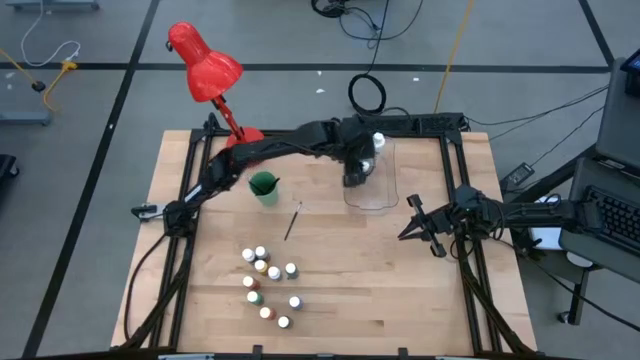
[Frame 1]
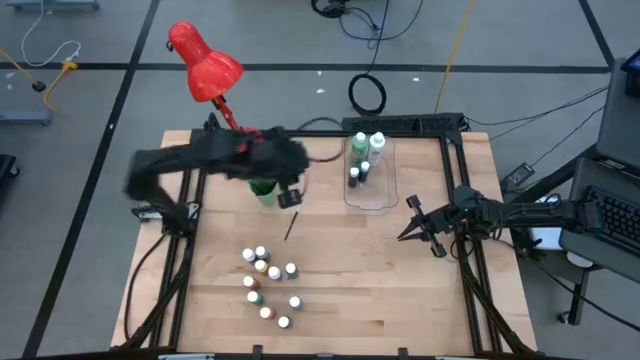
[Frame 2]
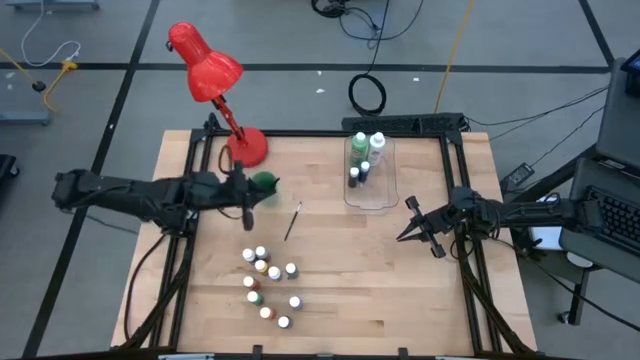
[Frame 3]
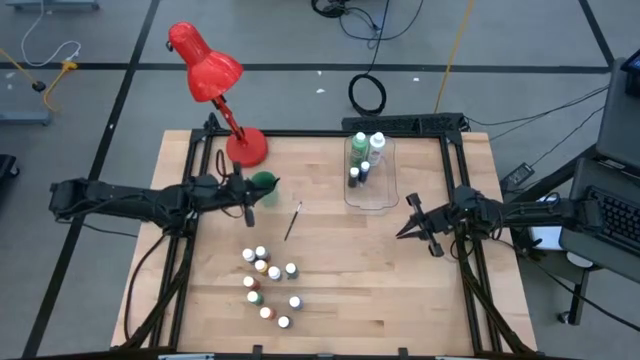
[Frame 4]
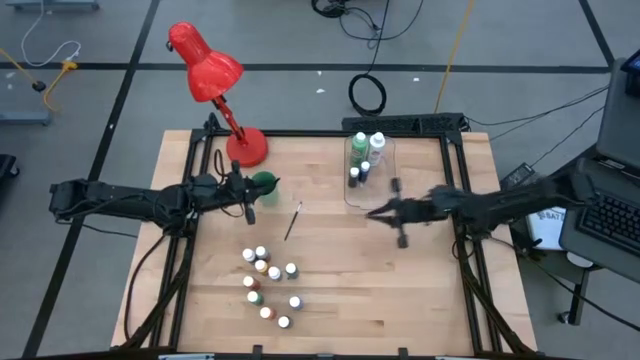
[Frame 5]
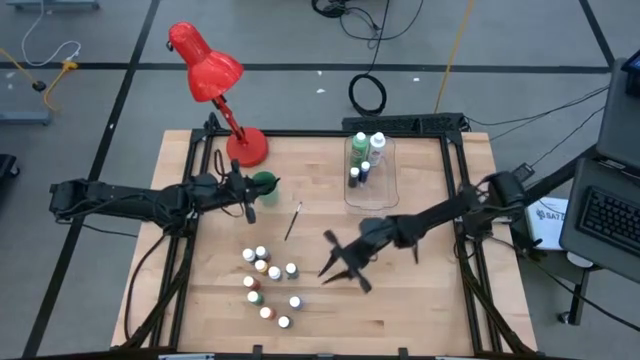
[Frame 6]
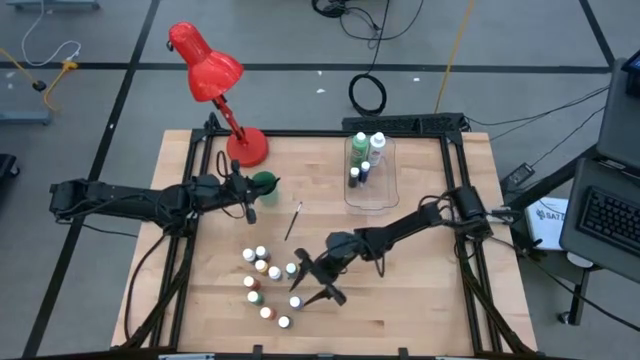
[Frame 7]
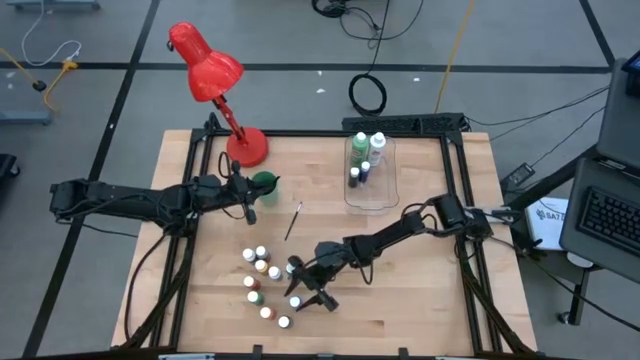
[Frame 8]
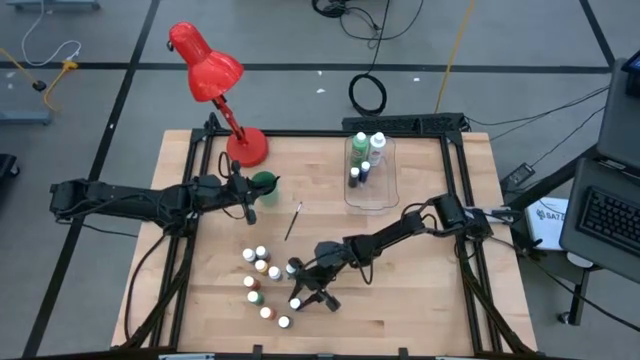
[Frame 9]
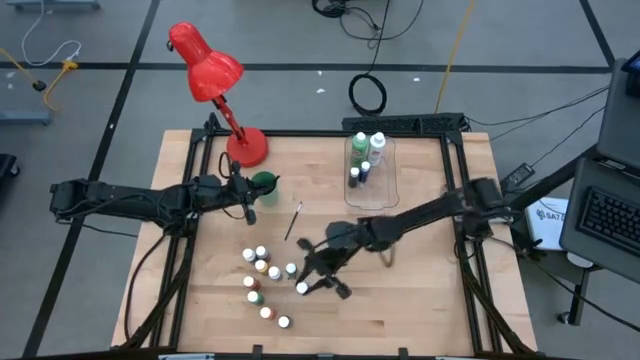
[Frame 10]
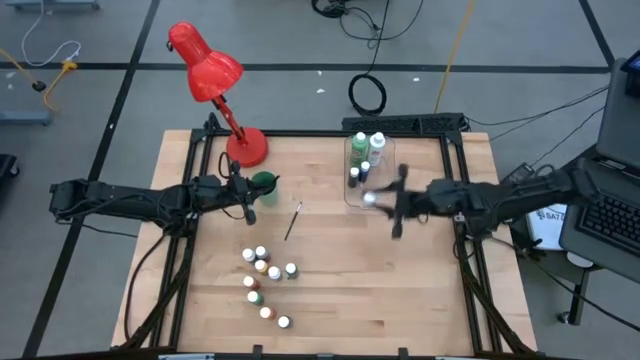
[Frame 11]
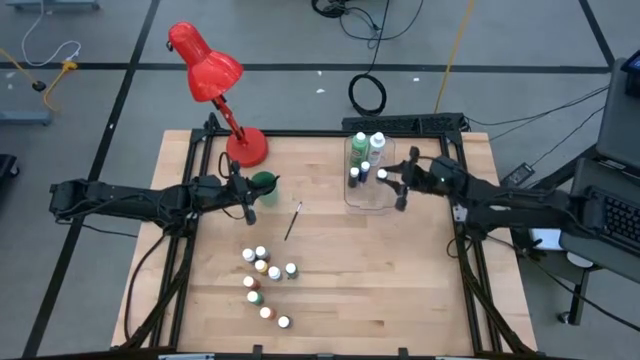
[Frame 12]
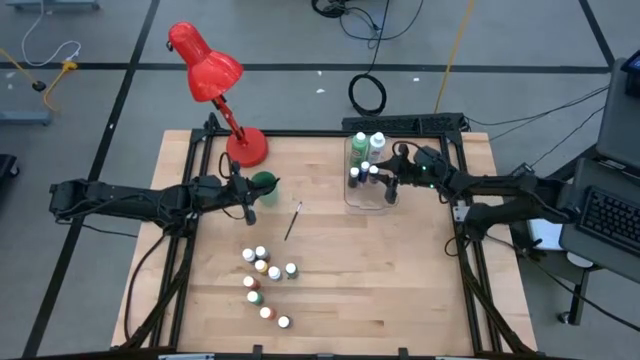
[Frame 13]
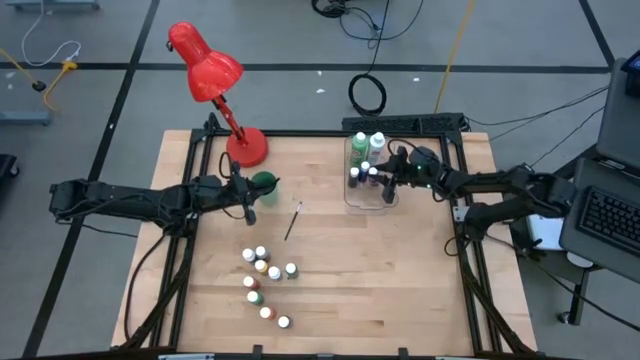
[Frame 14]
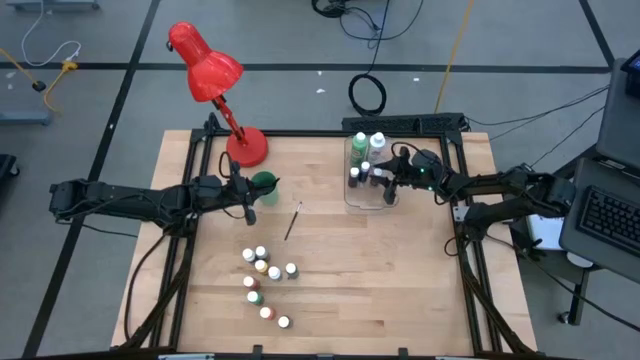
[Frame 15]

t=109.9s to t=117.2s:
Task: Pick & Place Paint Supplies
Put the small blue paint bottle into the transparent bin

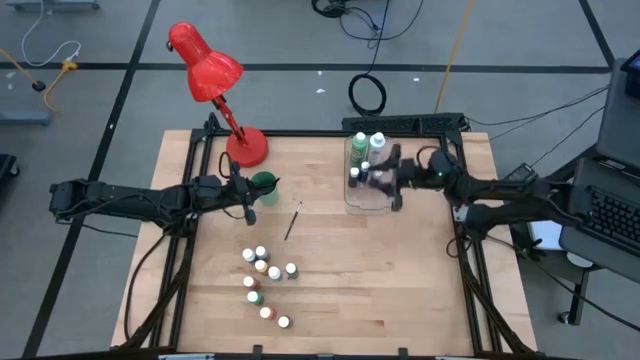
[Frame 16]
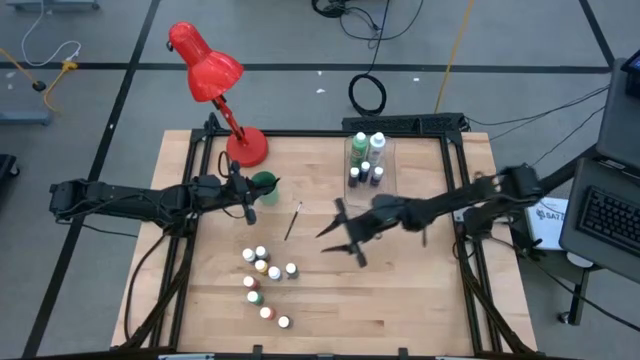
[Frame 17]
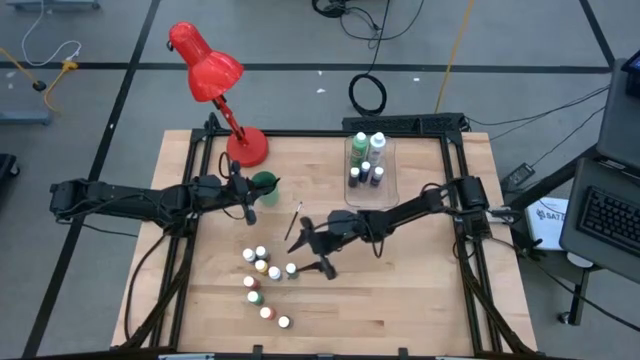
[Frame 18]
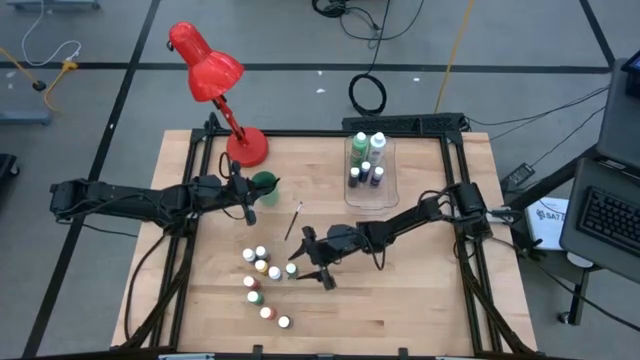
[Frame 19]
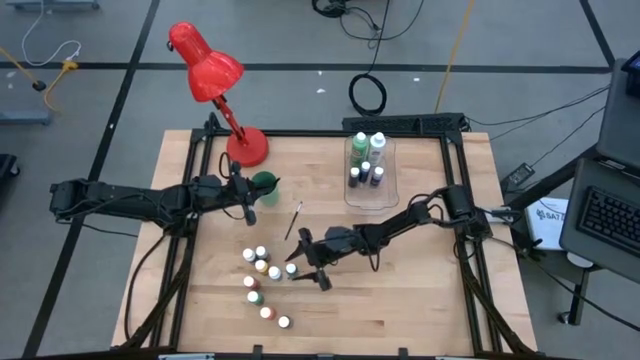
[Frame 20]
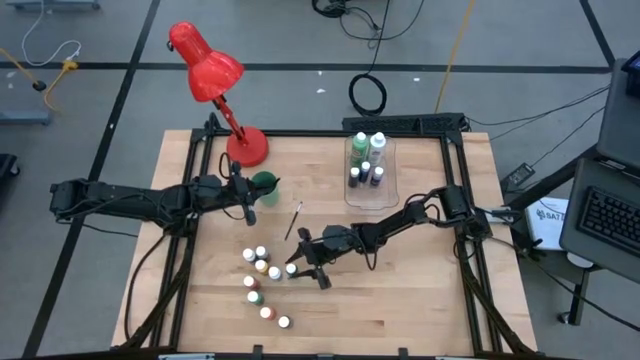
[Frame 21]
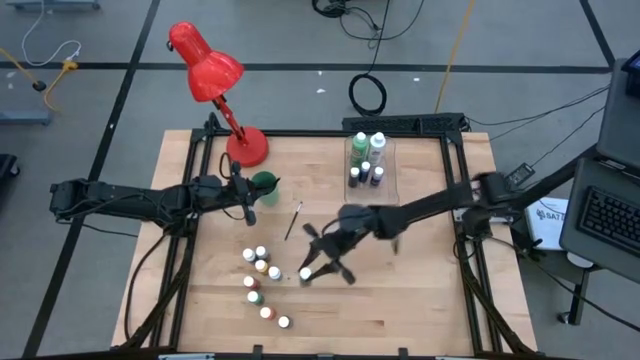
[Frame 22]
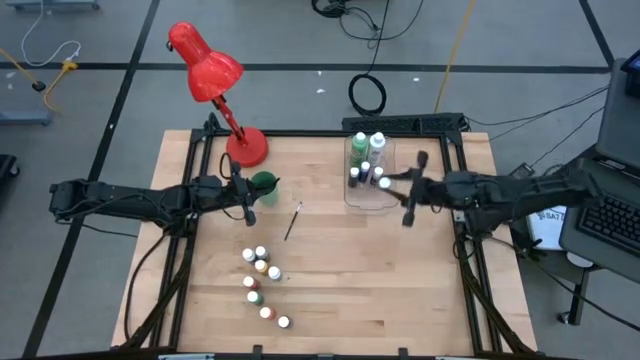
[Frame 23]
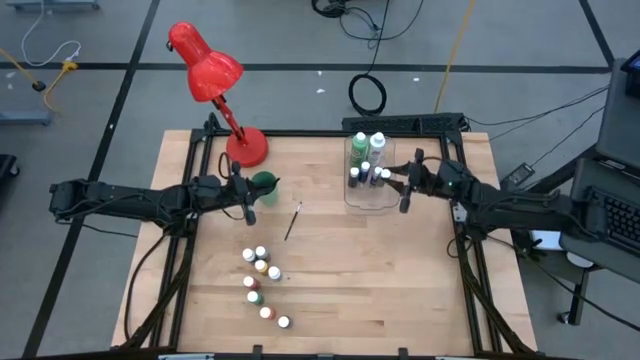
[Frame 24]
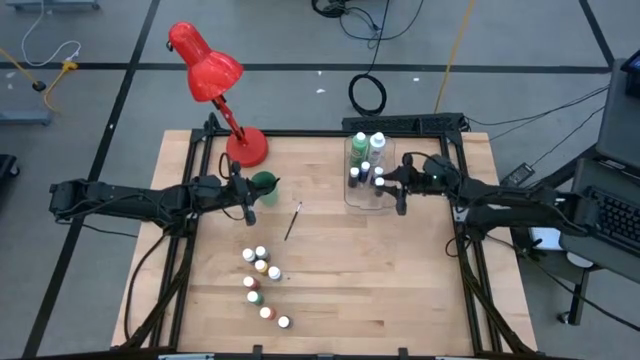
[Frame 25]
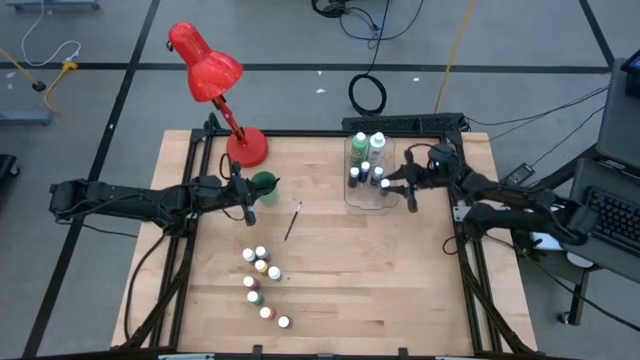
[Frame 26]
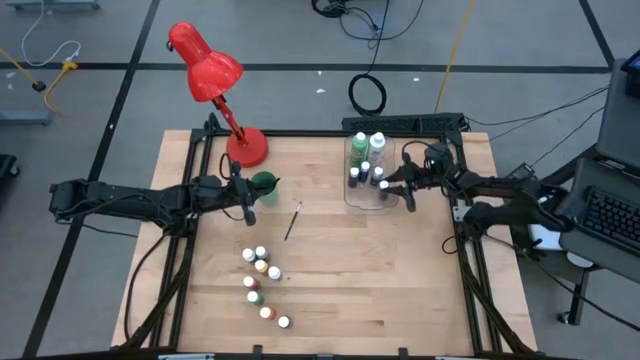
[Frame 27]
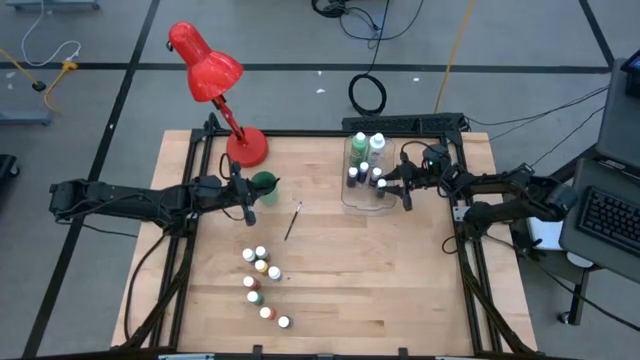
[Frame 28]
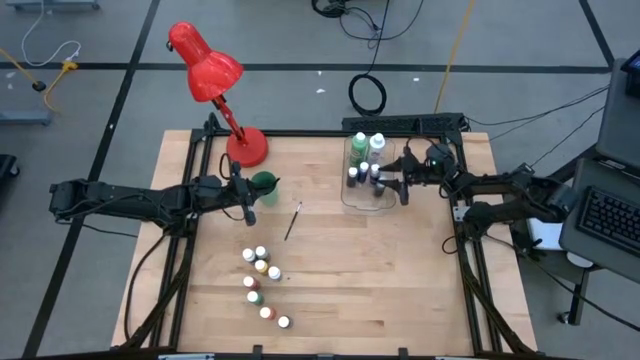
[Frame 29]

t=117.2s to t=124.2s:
Put the small green paint bottle into the transparent bin

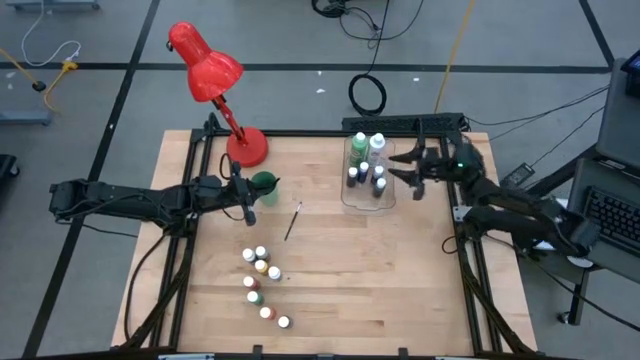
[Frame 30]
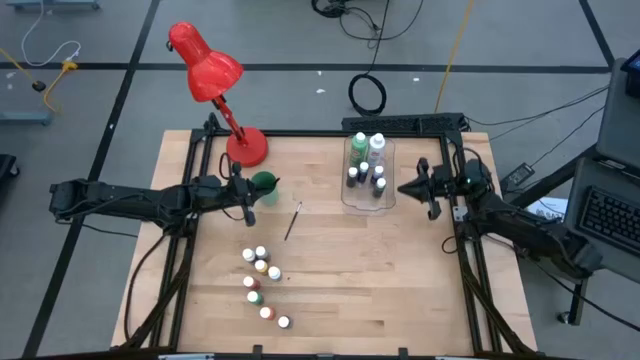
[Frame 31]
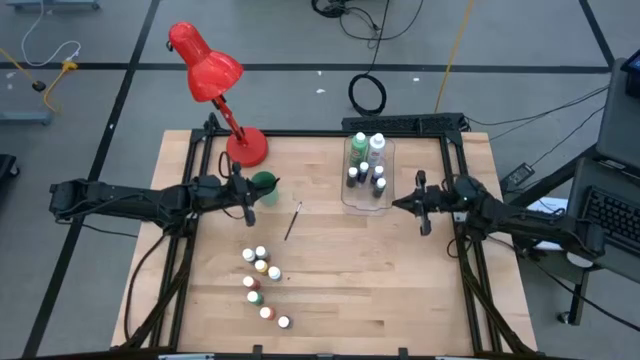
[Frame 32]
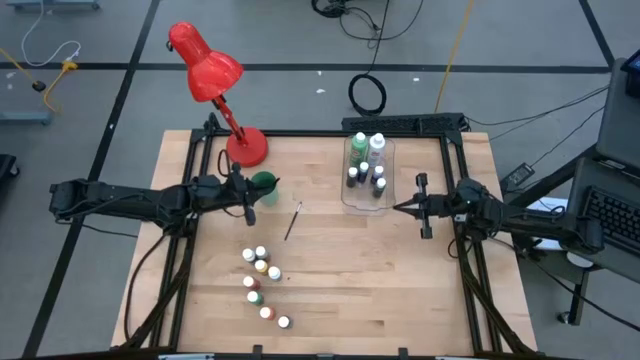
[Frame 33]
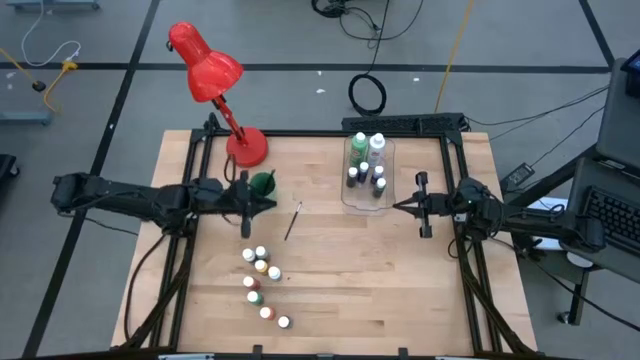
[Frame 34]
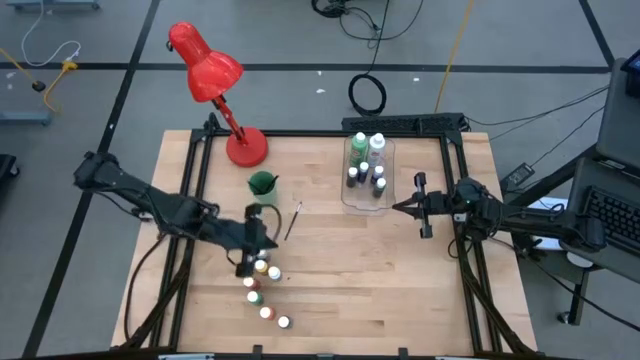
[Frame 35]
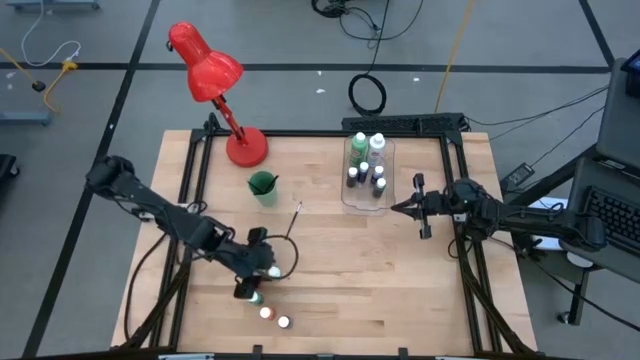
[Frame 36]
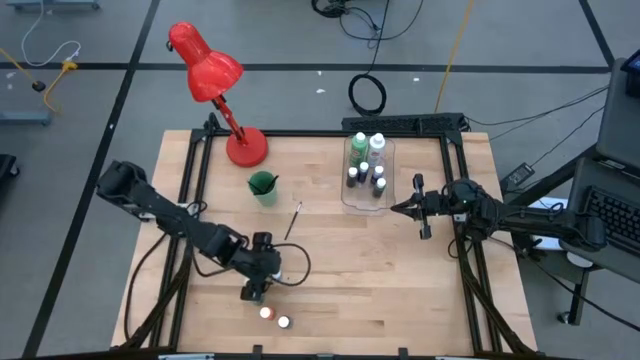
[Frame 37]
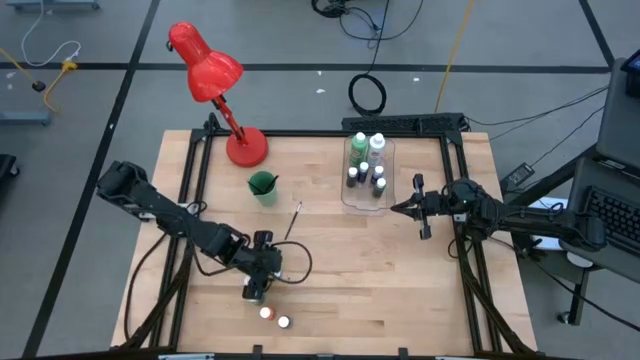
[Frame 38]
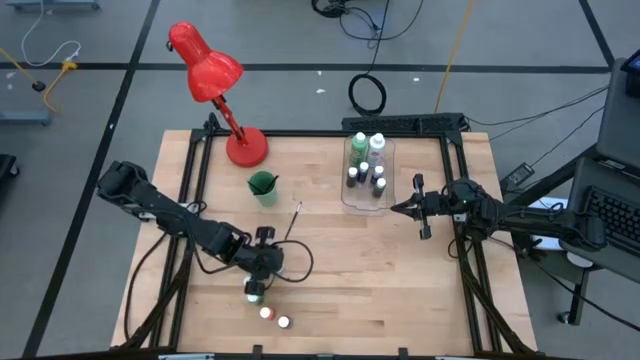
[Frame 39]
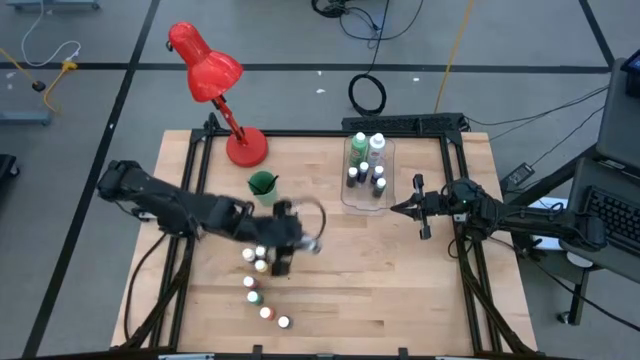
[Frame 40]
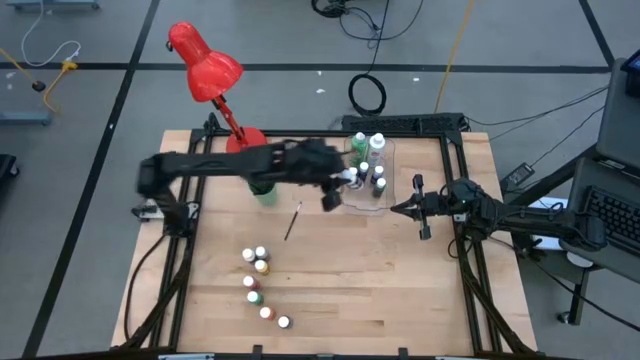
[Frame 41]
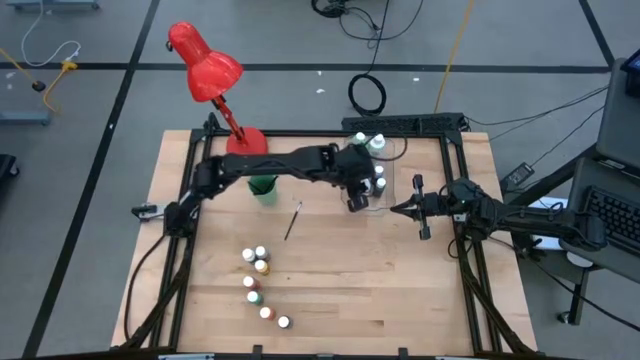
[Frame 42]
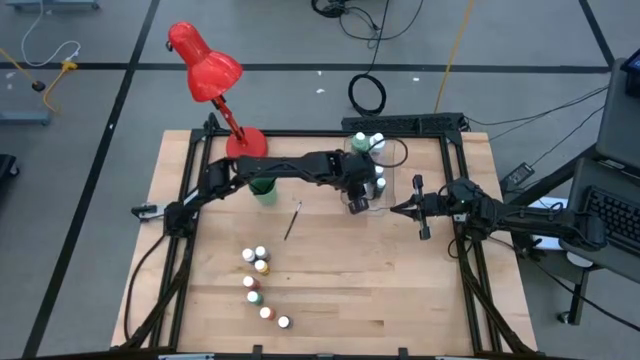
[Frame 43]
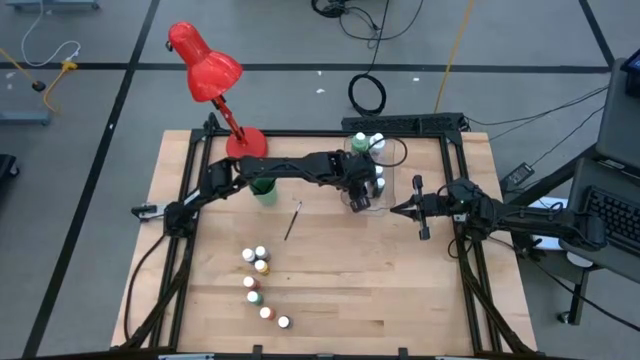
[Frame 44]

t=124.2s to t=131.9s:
Put the small white paint bottle into the transparent bin
